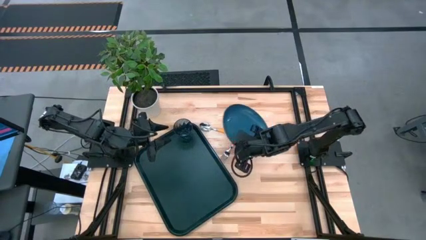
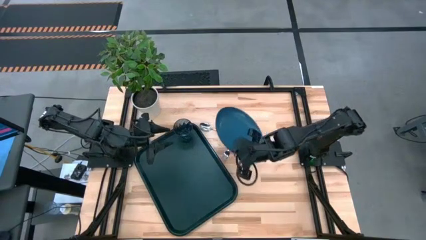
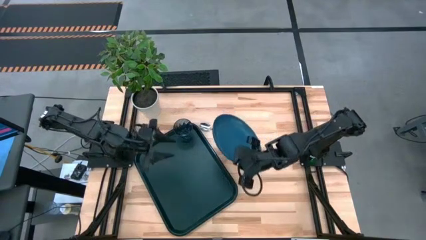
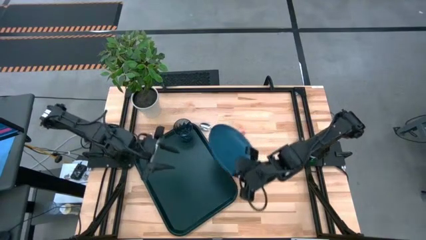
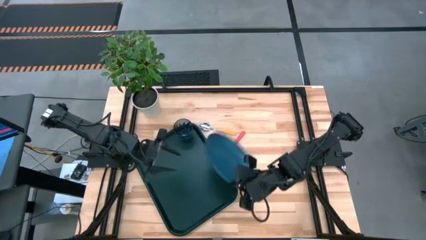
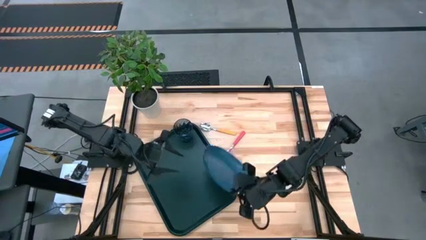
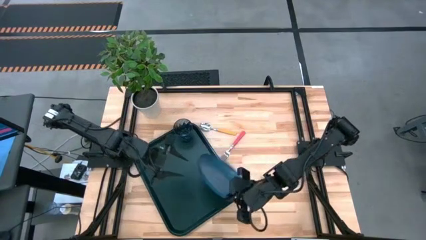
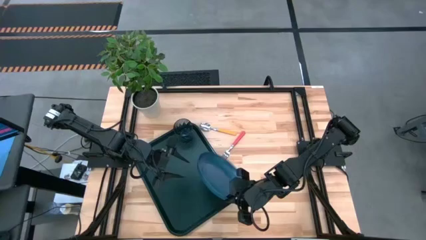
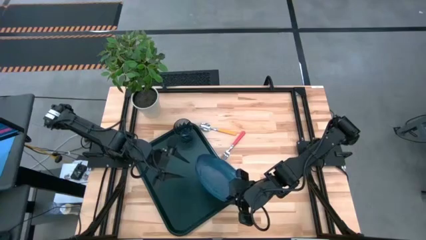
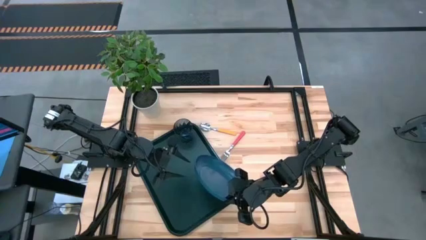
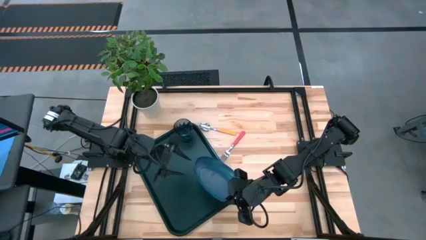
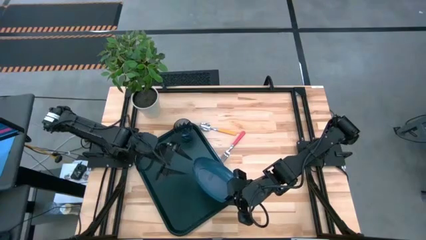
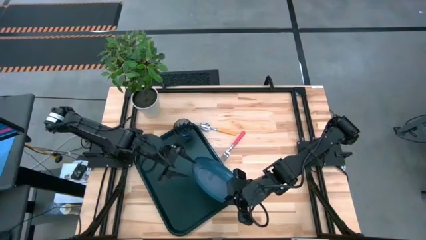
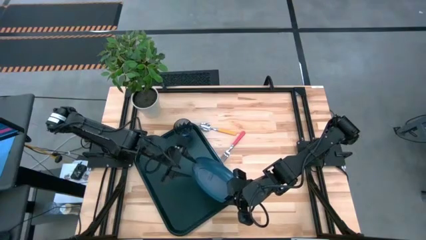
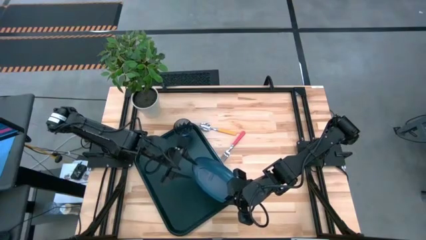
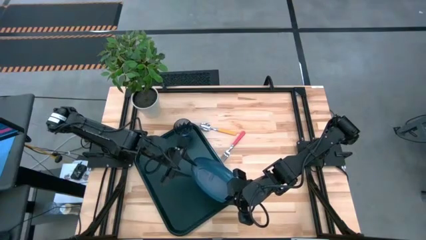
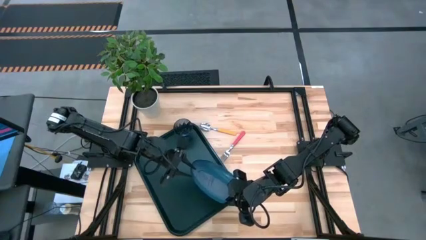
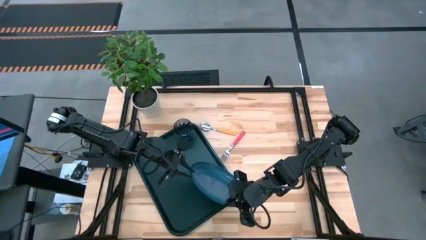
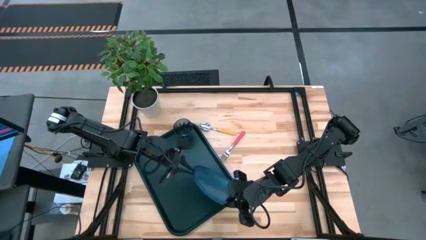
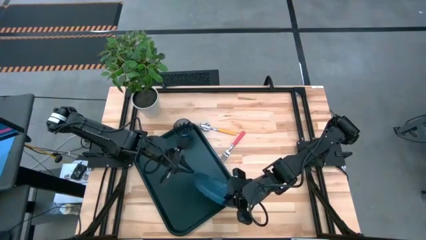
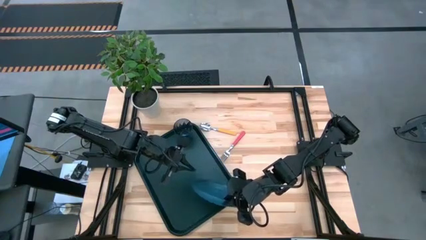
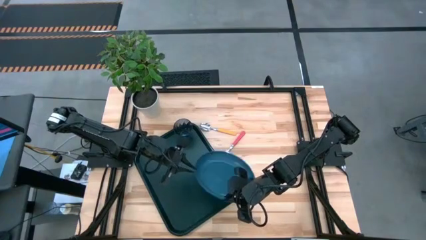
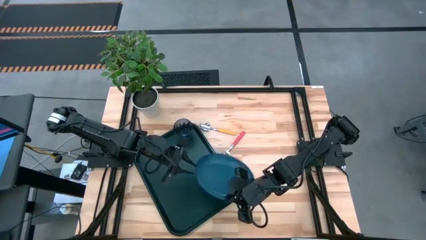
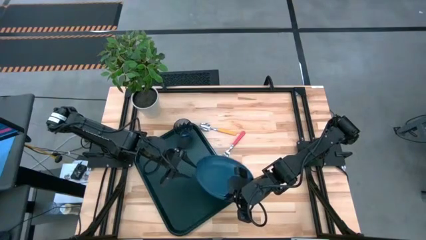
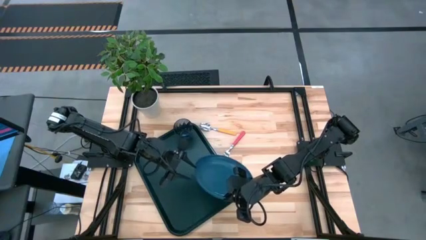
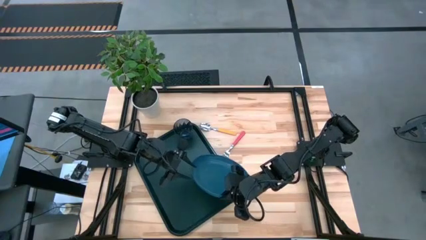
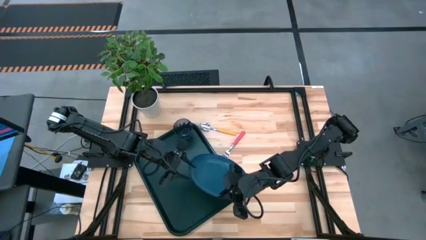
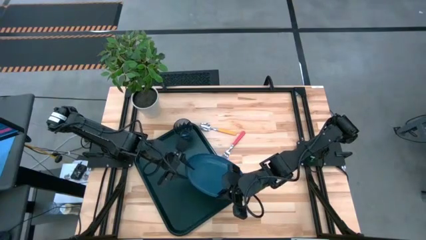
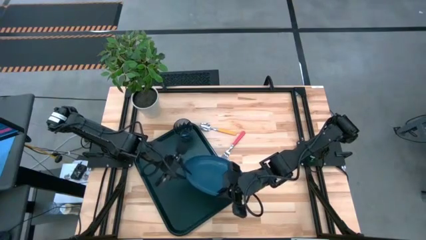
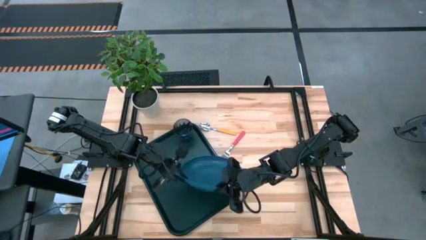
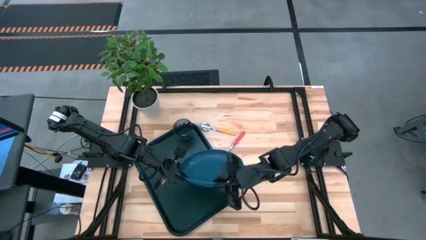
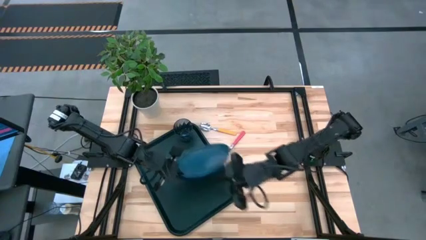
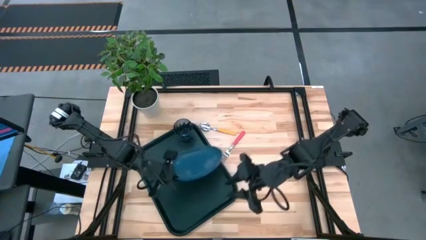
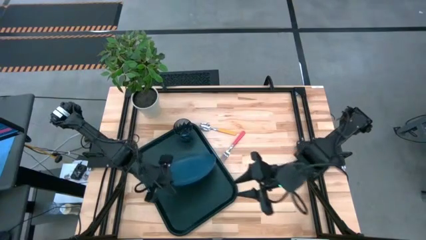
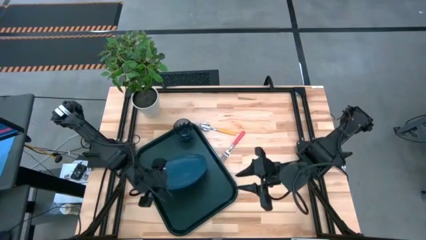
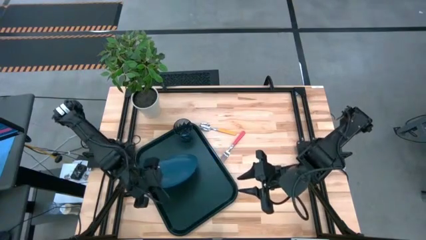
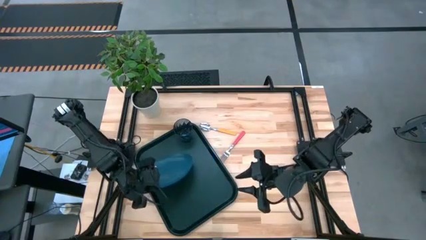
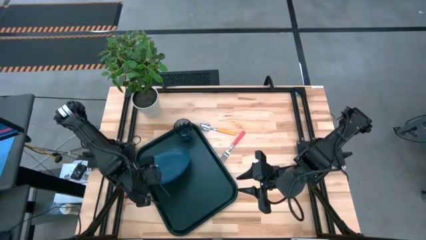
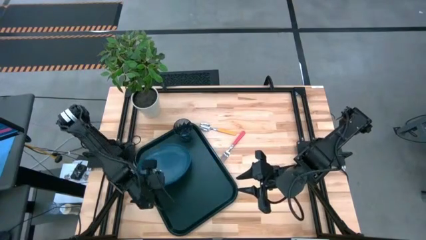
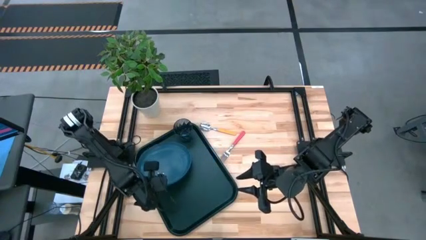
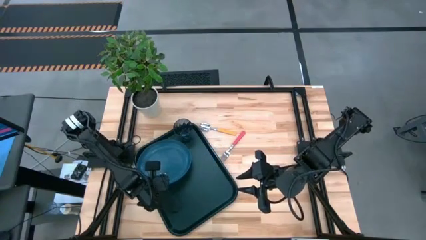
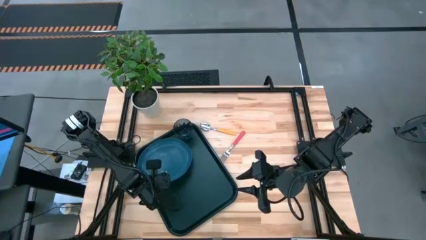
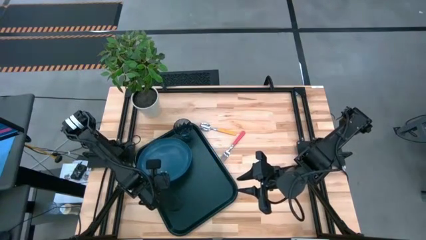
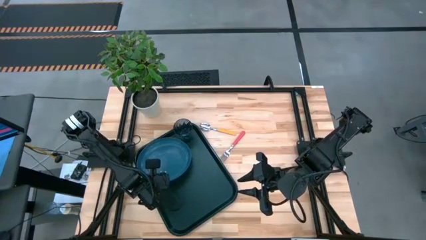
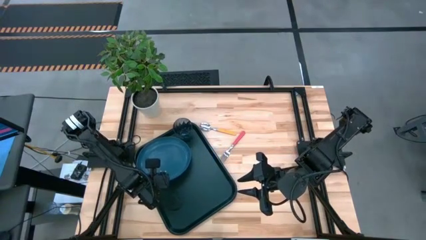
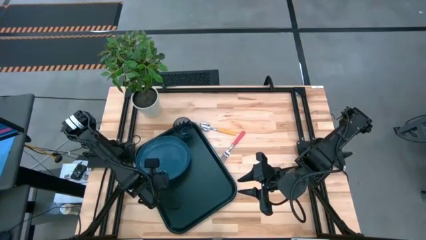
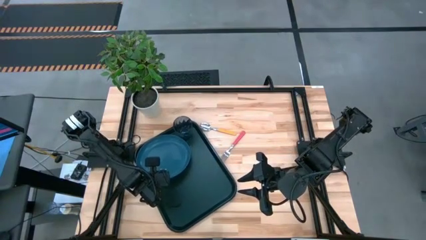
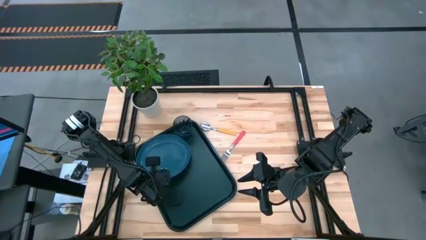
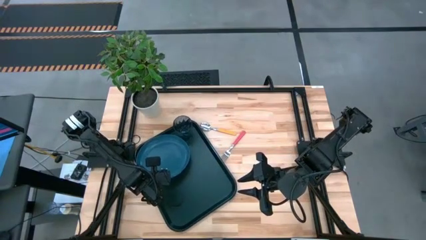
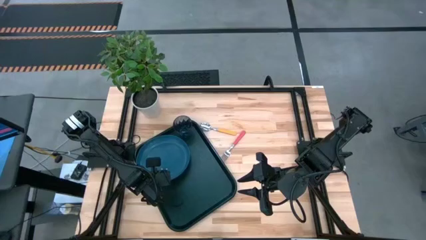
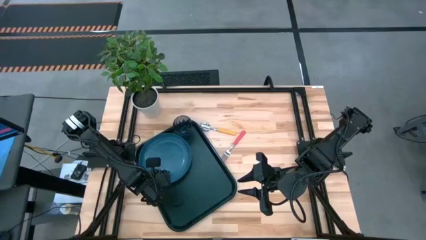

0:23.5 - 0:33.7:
Task: Pick and place plate/cup/fork/spoon on tray
Put the blue plate on the black tray at the bottom of the blue cup

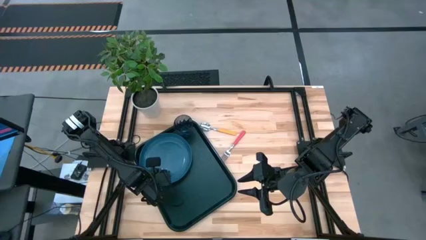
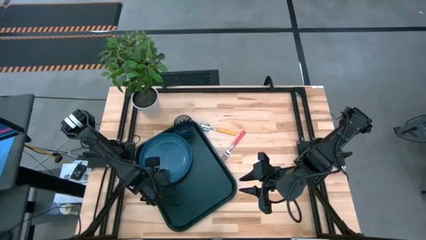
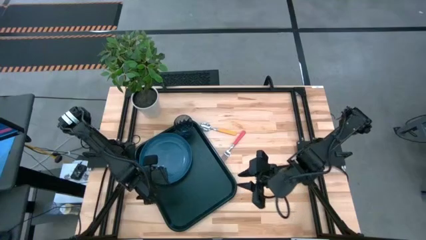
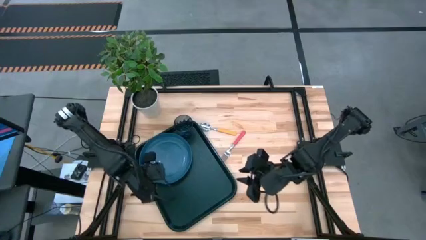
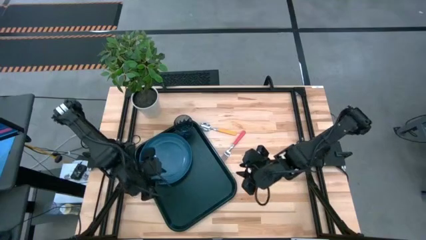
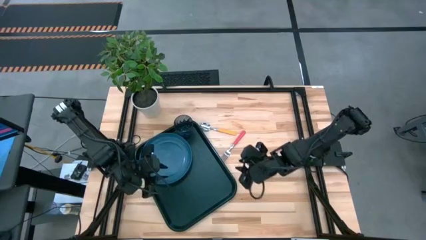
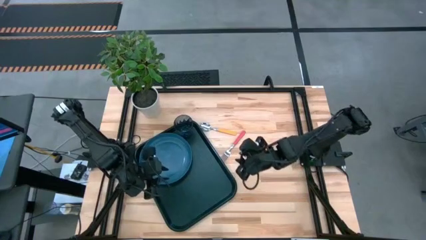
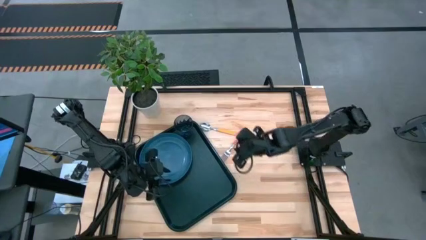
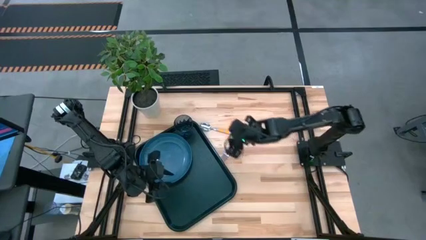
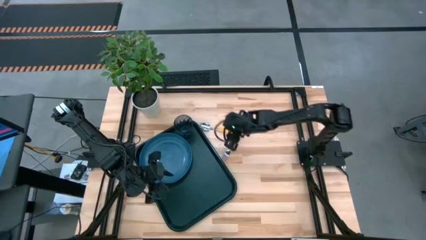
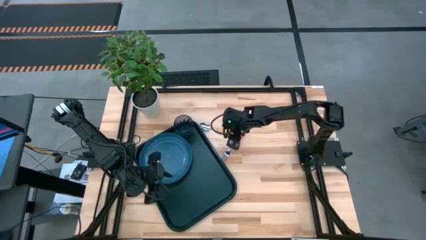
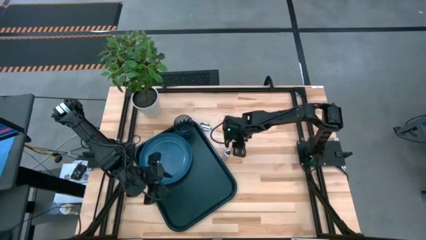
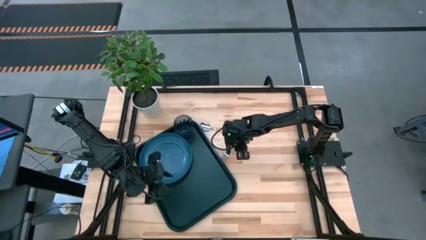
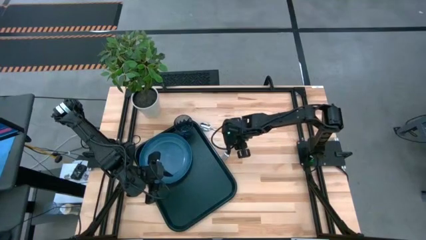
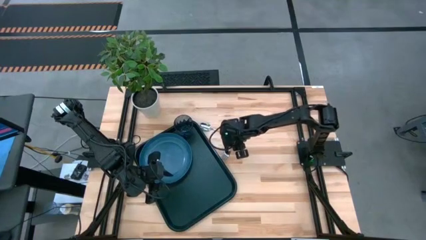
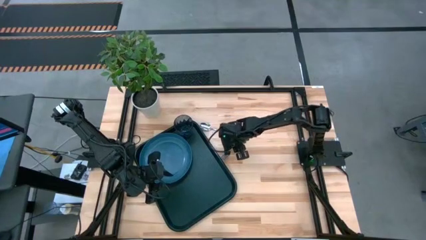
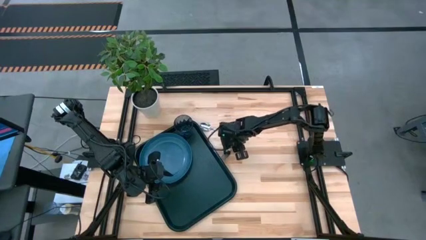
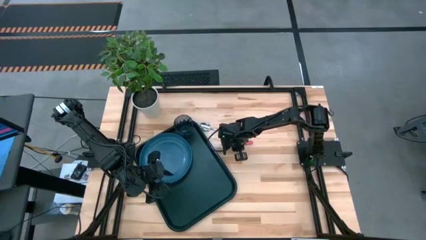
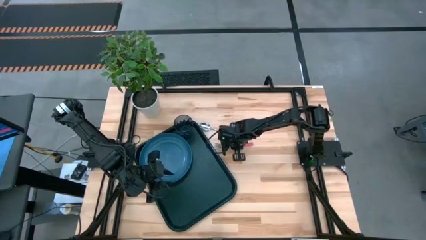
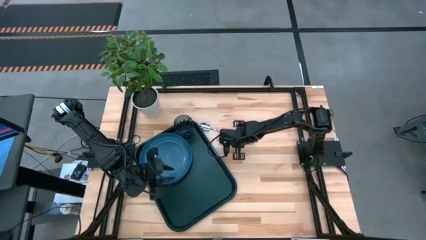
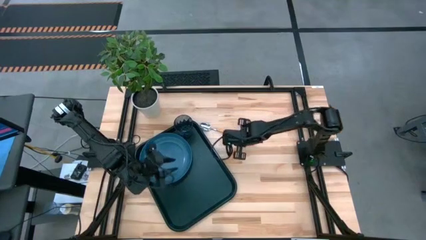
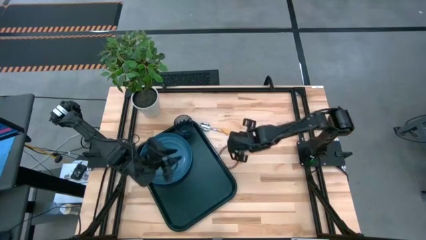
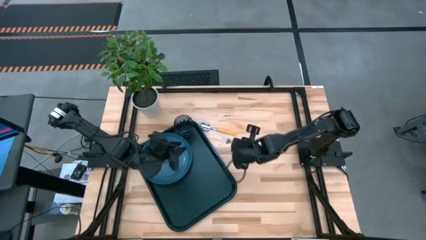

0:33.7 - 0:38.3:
Put the pink fork on the black tray on the right of the blue plate

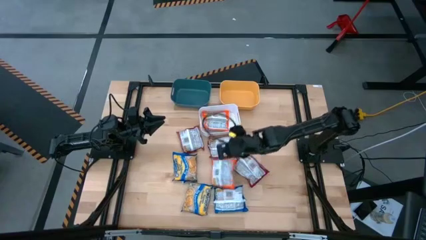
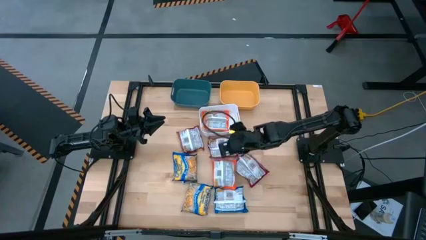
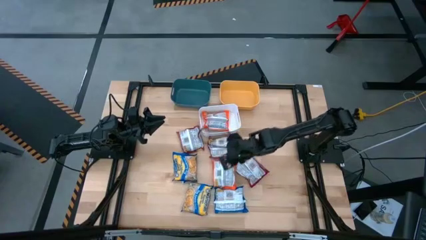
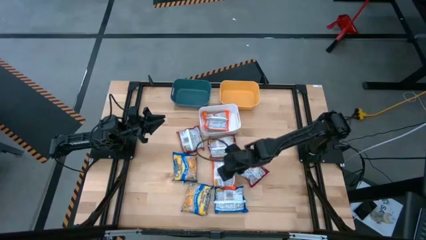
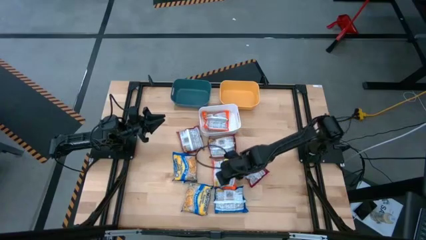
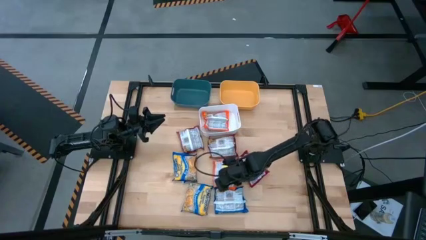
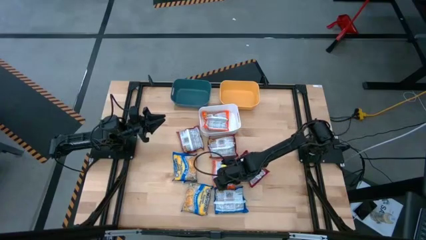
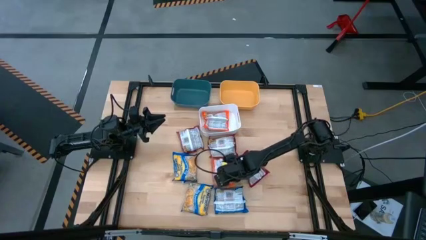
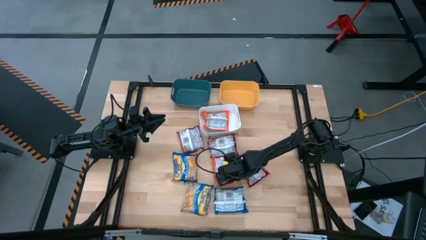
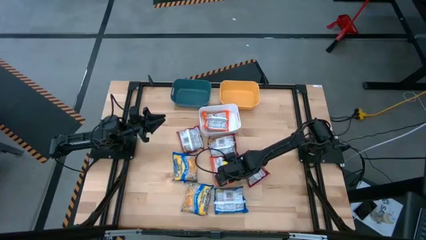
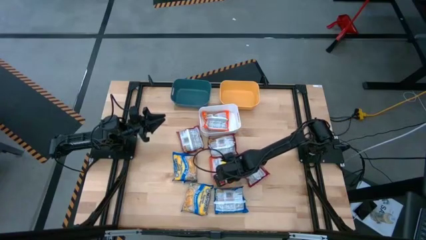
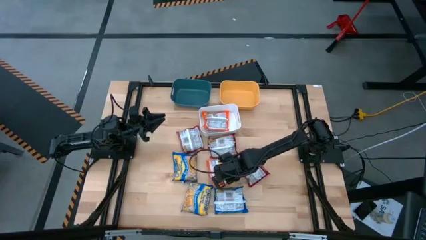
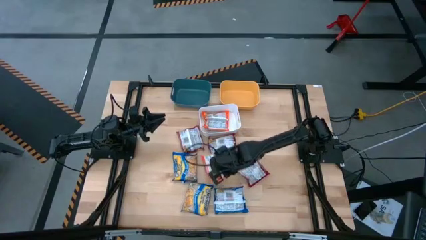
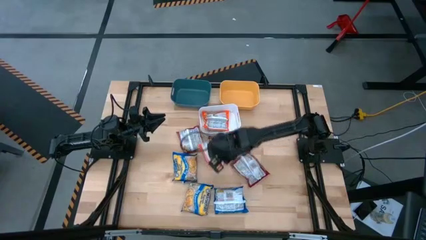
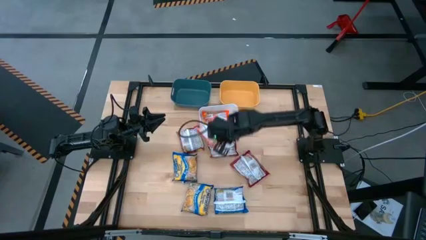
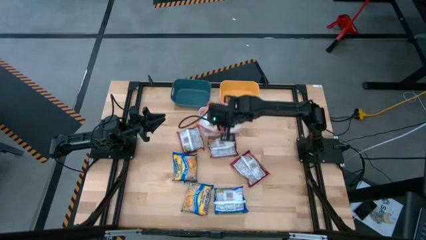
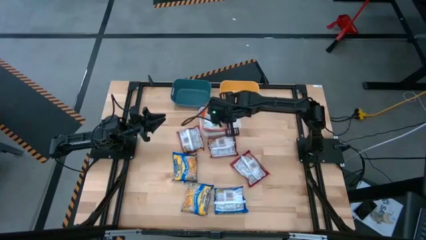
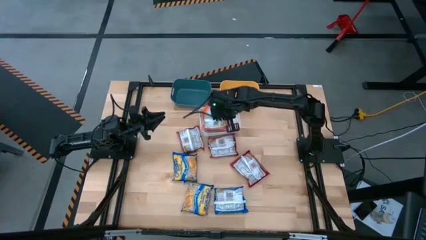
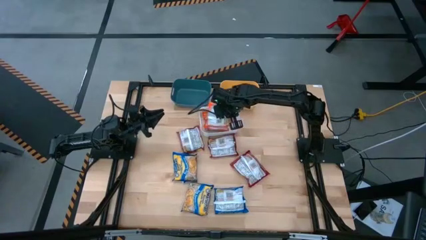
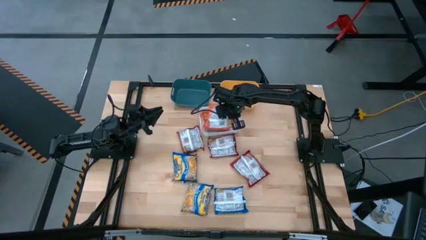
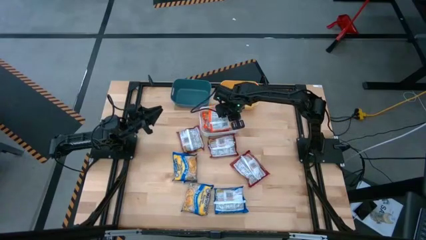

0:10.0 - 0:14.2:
Task: Sort Maruchan noodles
Put the orange noodle pack into the white bin
